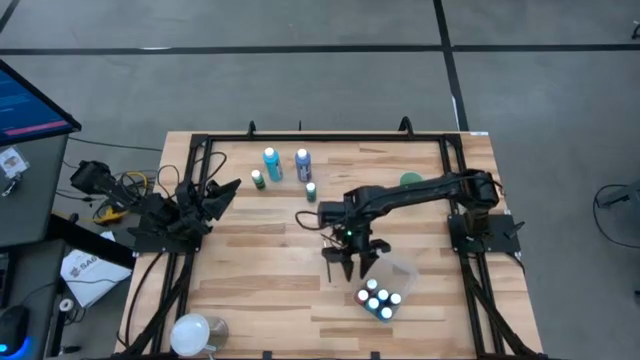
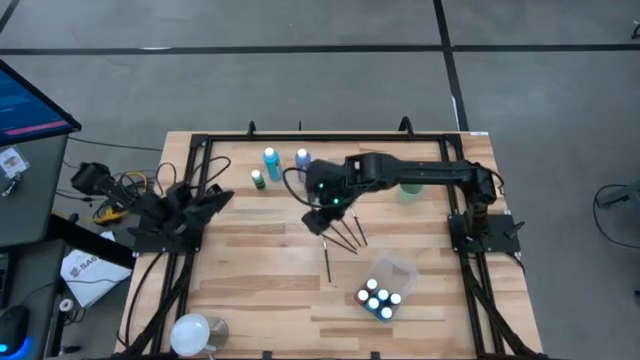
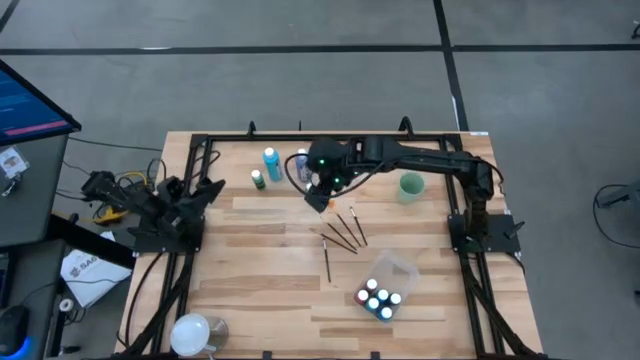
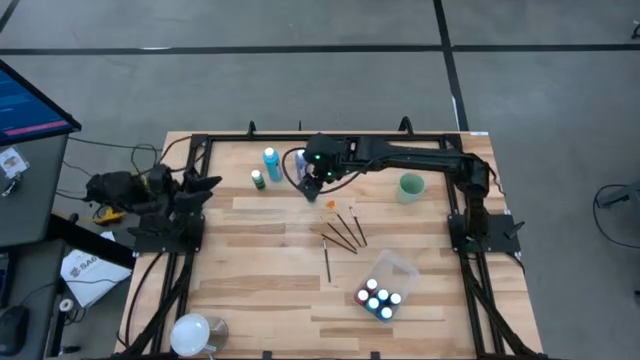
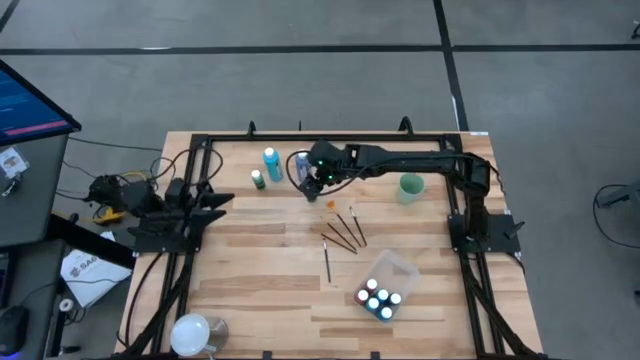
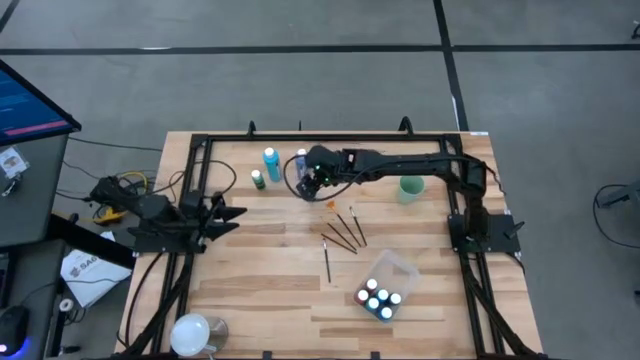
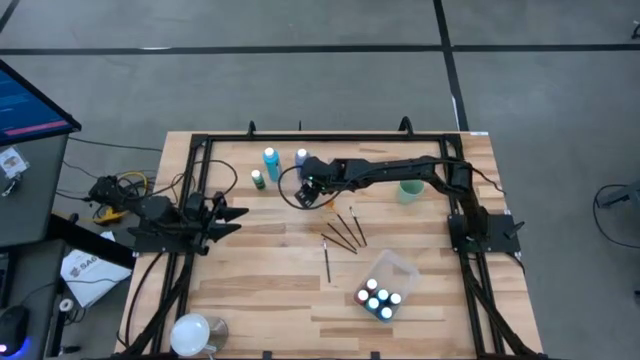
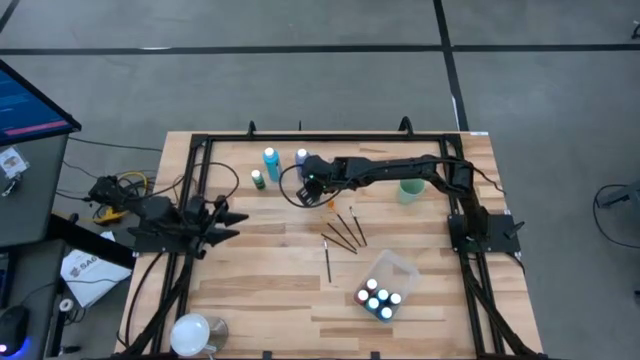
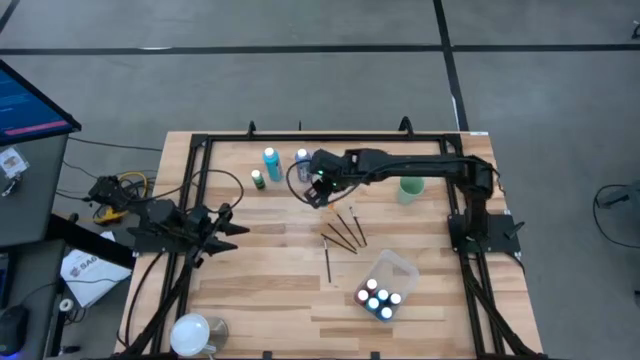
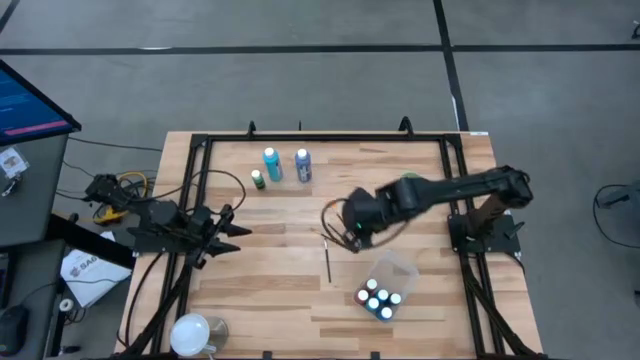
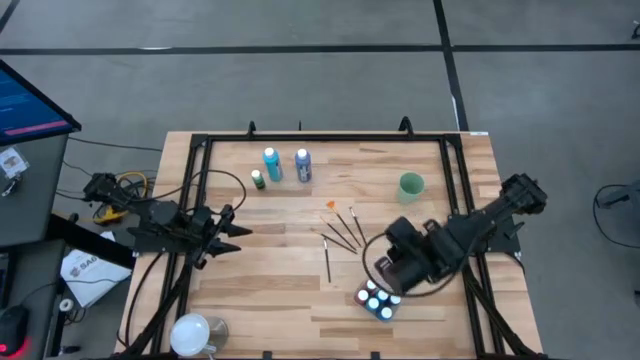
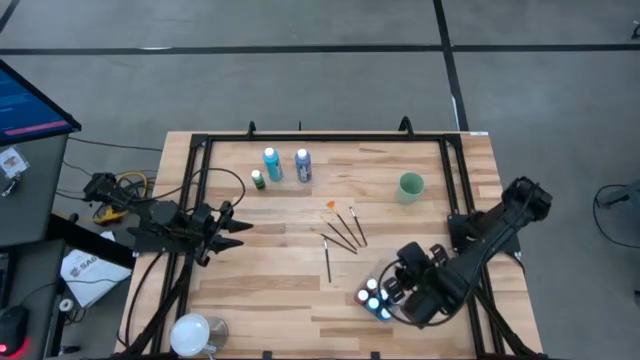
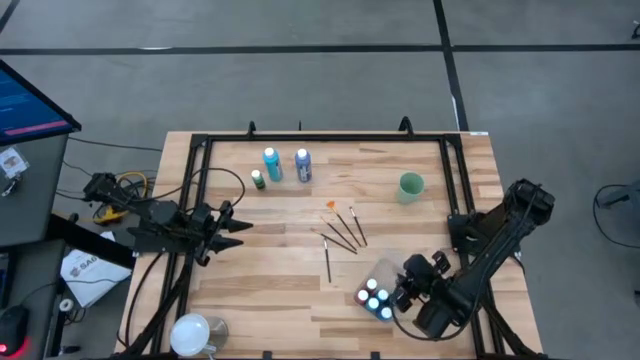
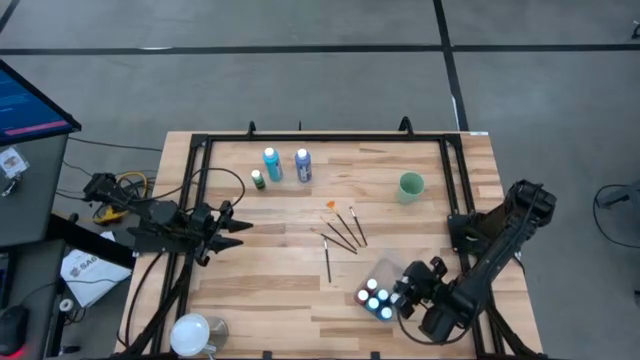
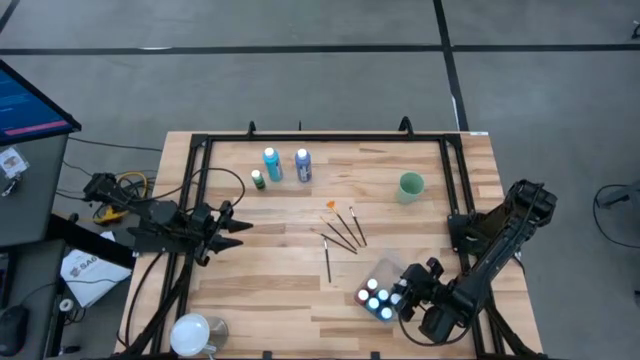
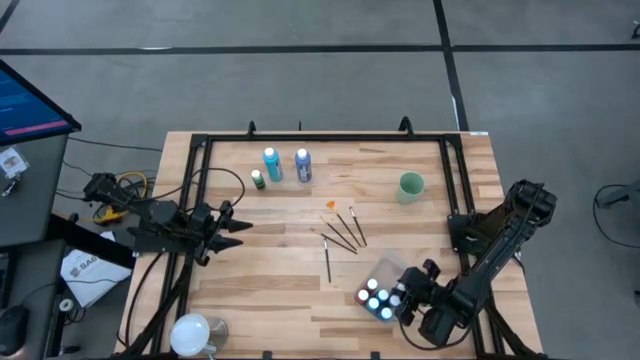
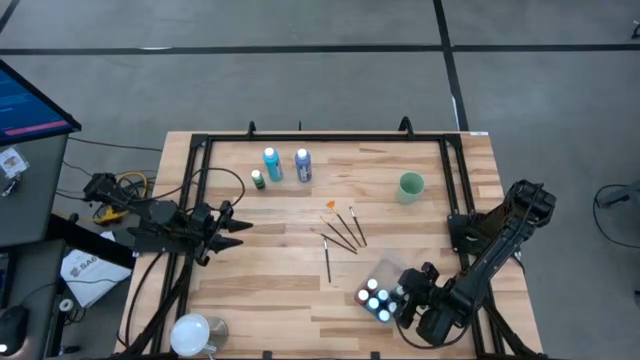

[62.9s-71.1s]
Task: Pick & Place Paint Supplies
Put the green paint bottle into the transparent bin

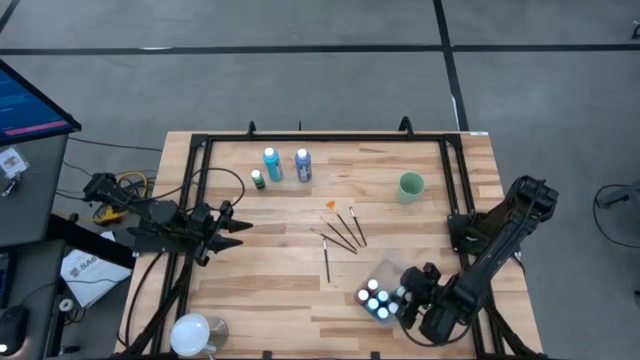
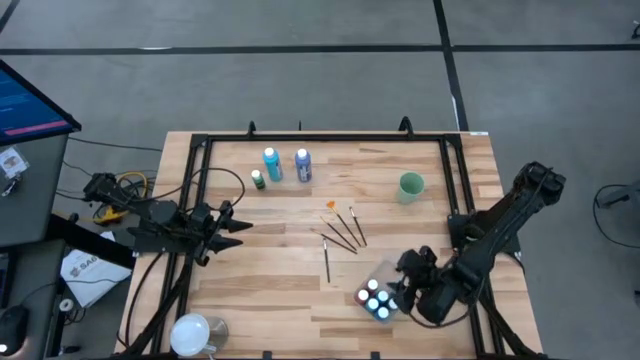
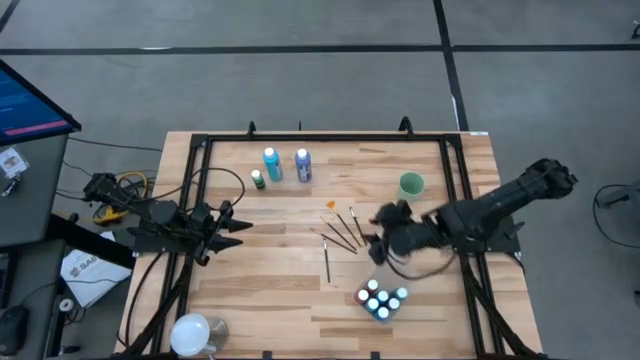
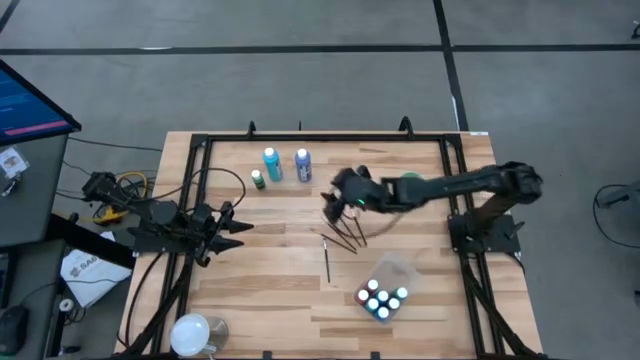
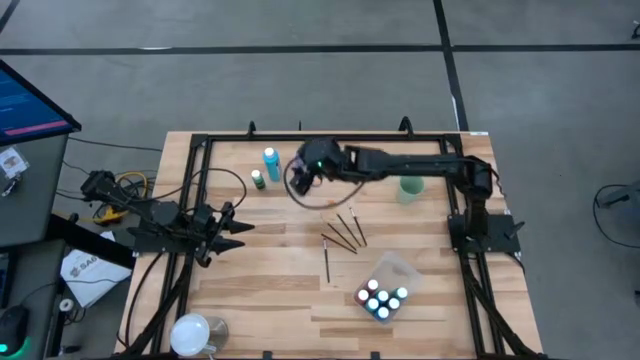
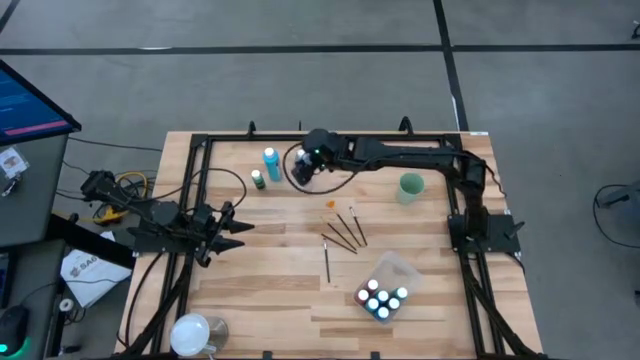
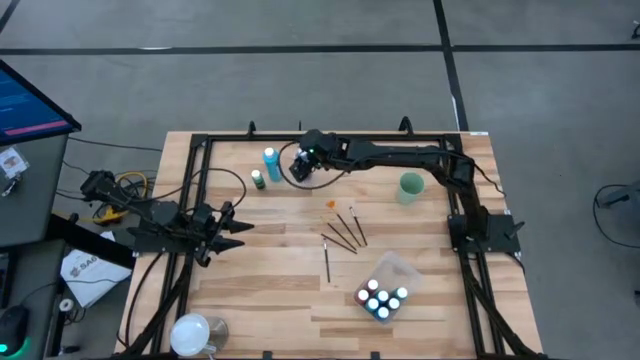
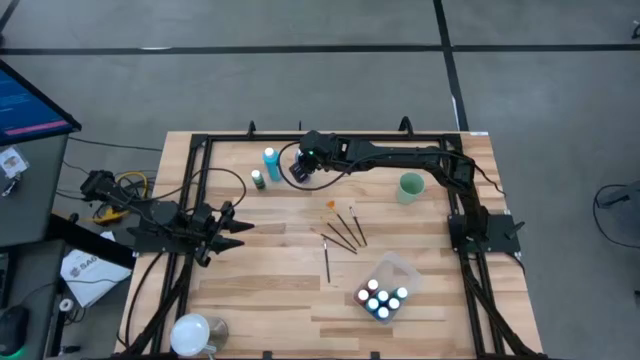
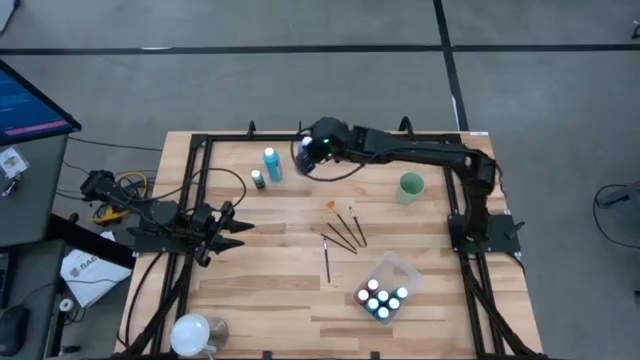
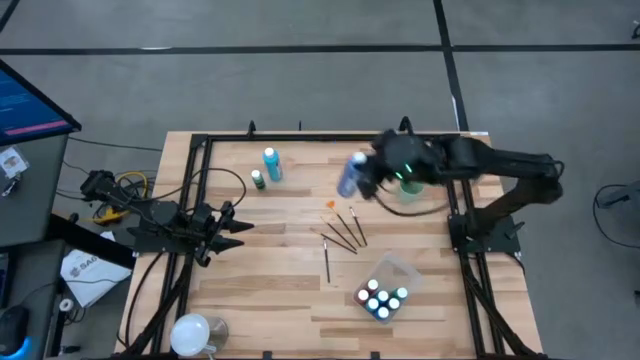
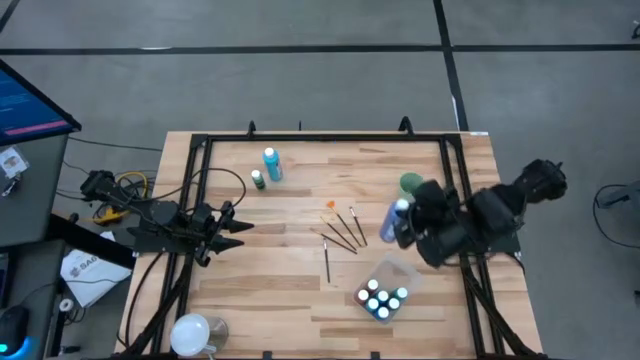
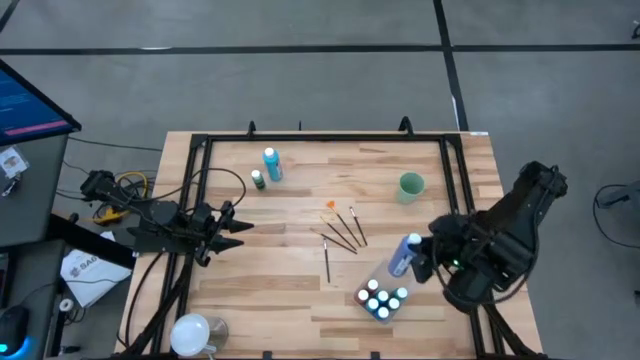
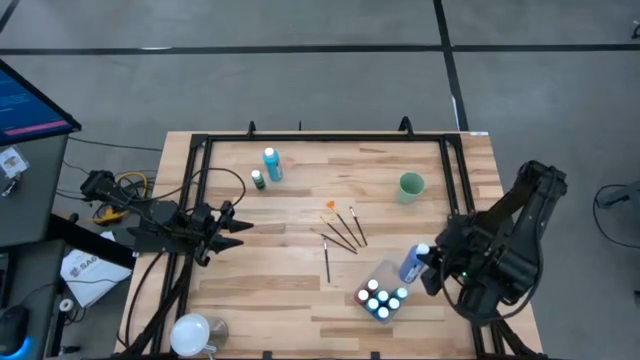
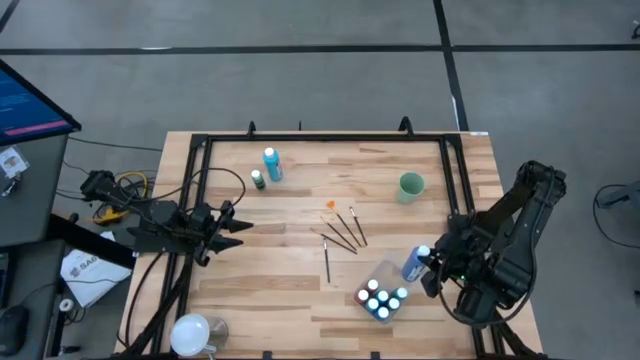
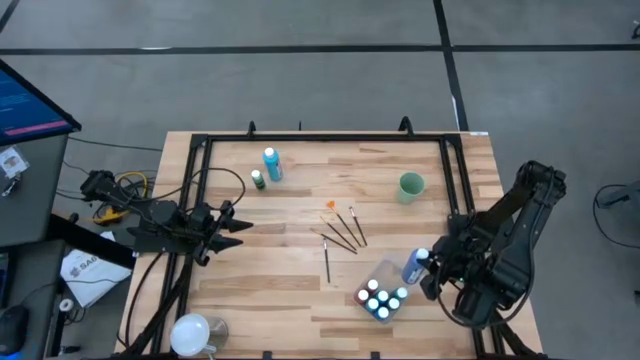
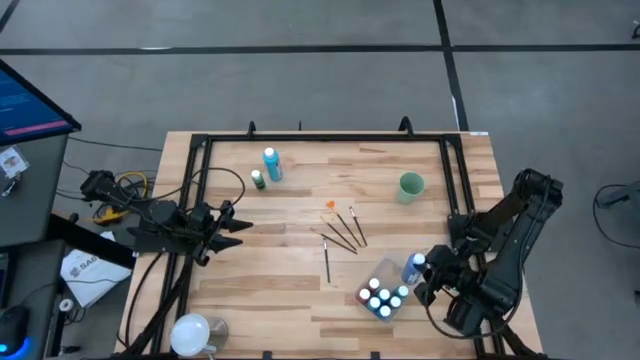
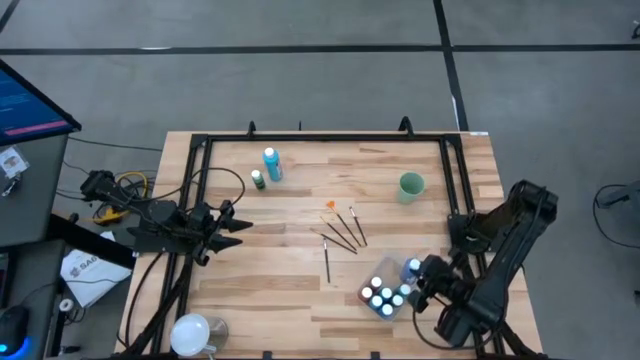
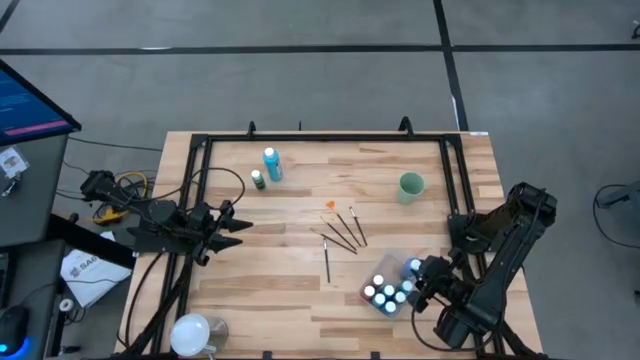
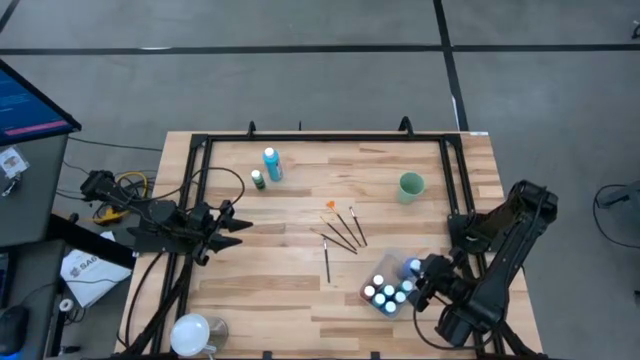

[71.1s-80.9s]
Put the blue paint bottle into the transparent bin
